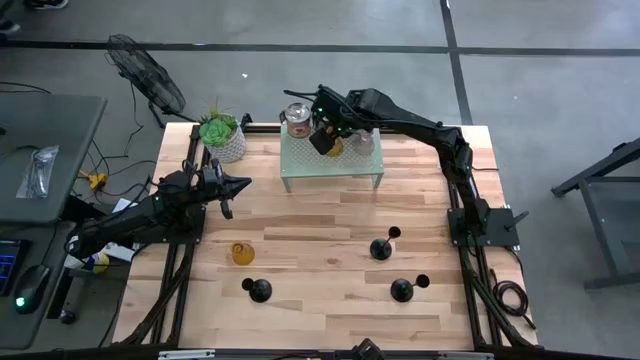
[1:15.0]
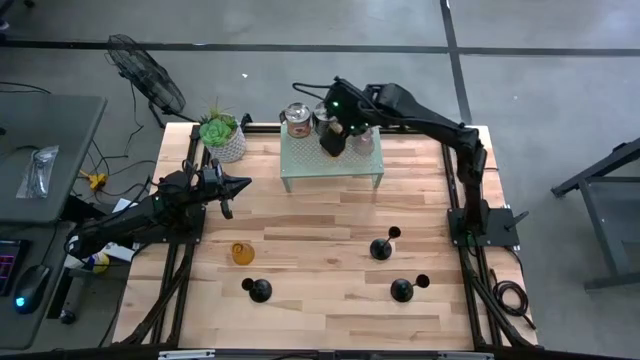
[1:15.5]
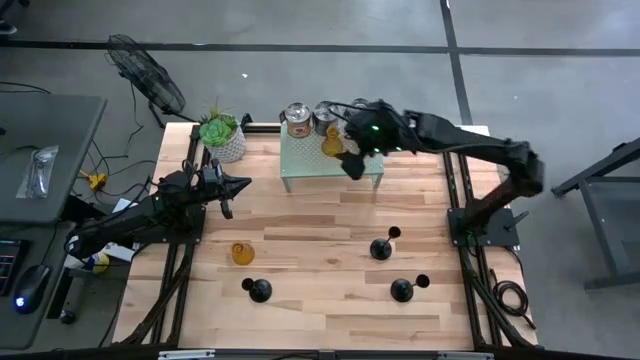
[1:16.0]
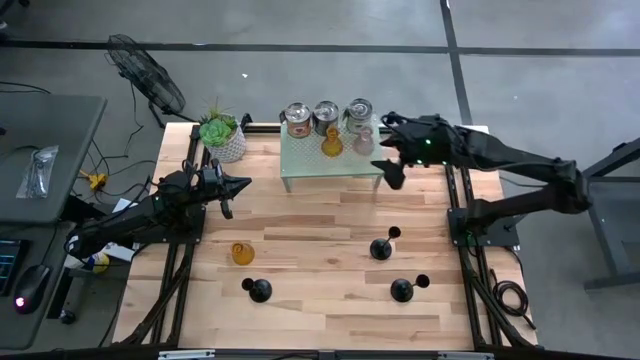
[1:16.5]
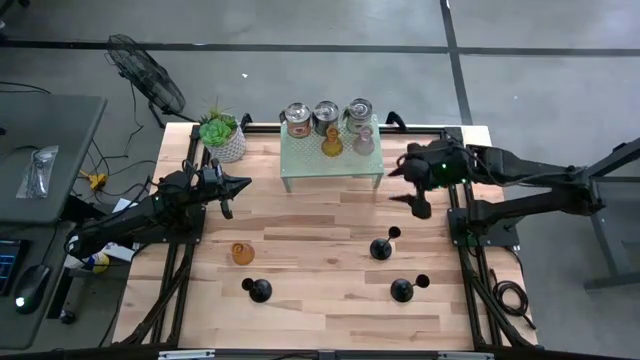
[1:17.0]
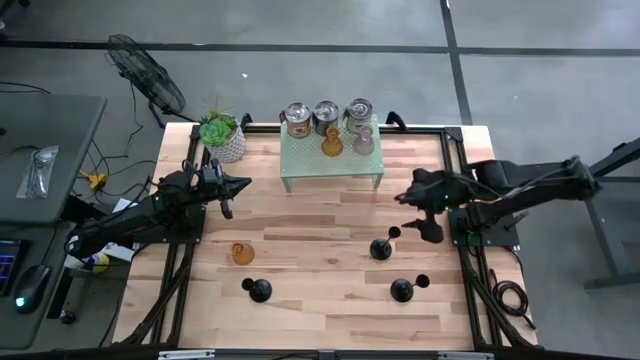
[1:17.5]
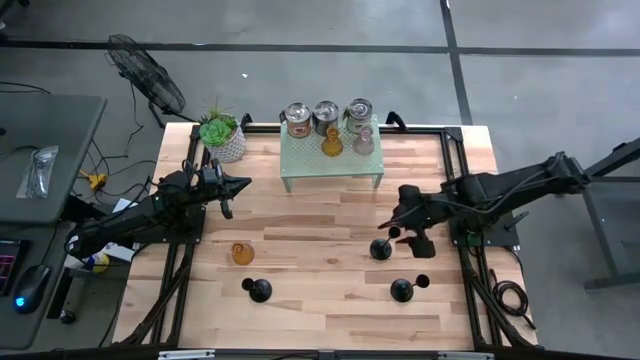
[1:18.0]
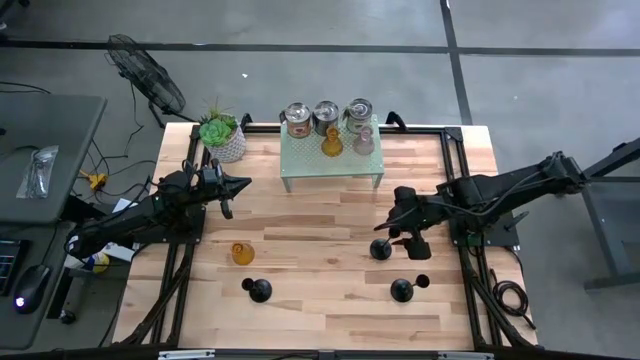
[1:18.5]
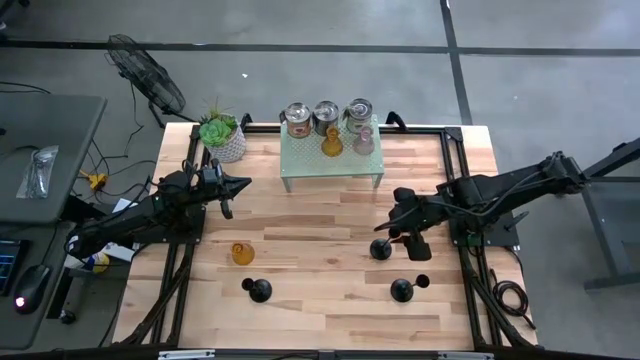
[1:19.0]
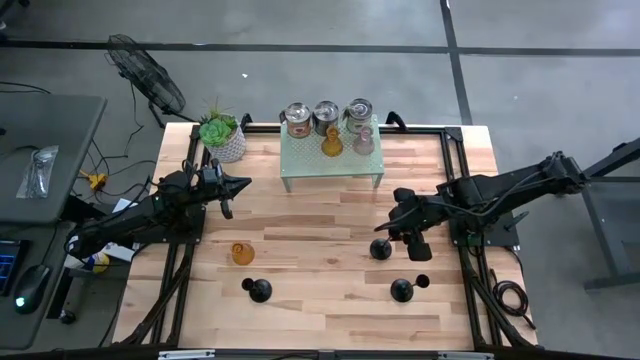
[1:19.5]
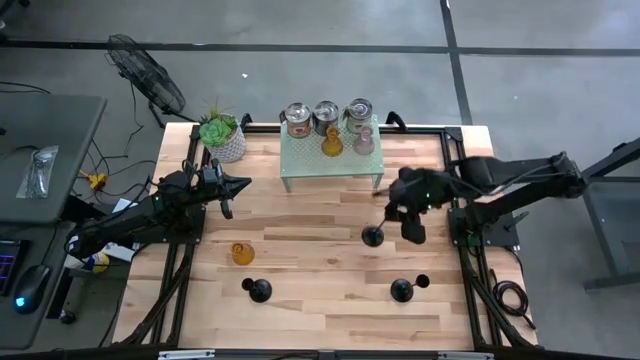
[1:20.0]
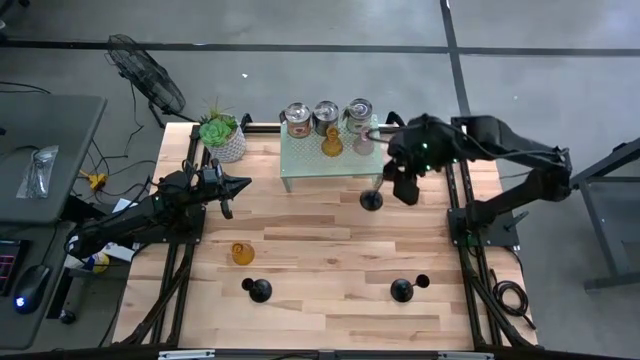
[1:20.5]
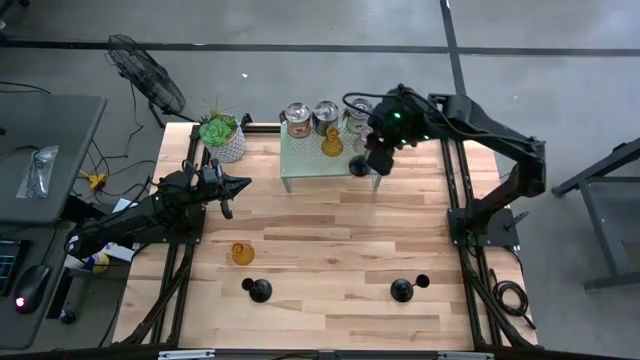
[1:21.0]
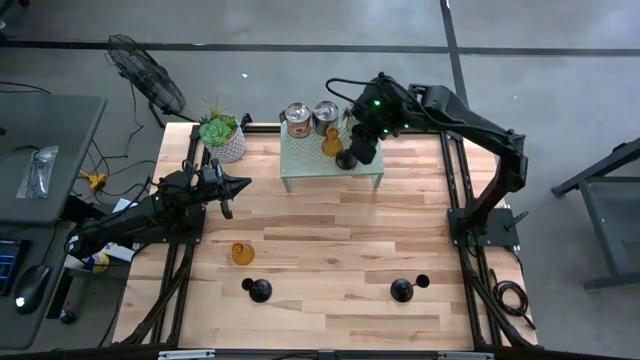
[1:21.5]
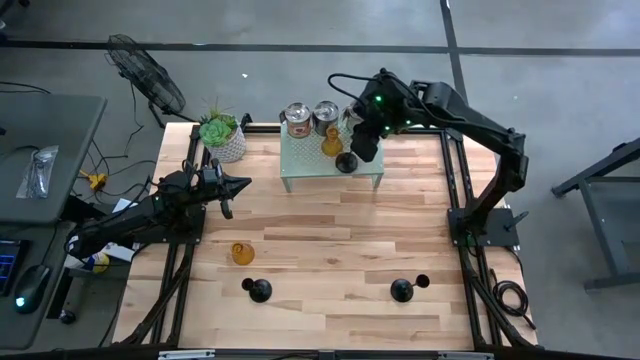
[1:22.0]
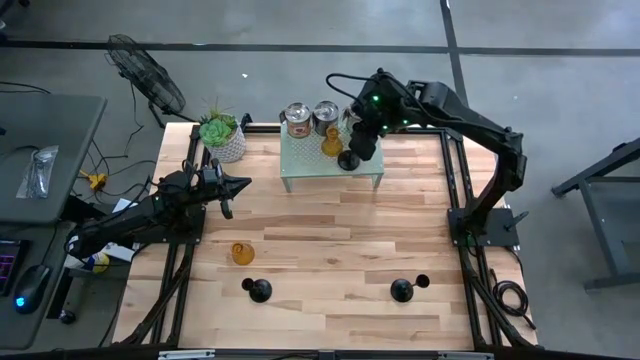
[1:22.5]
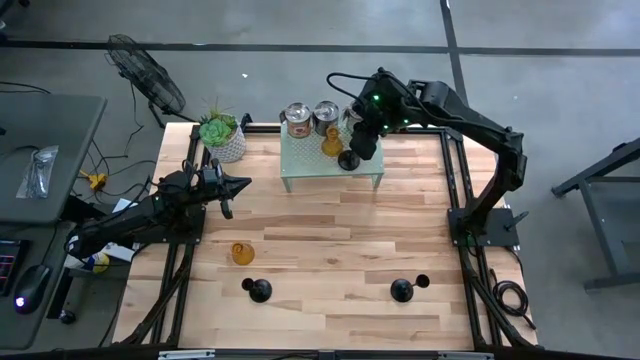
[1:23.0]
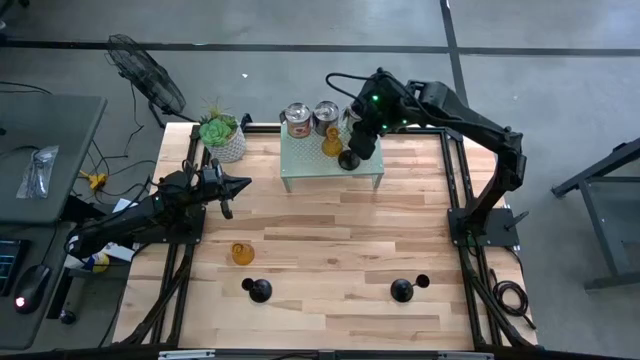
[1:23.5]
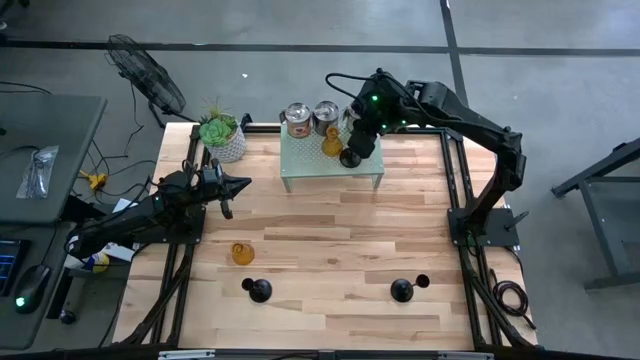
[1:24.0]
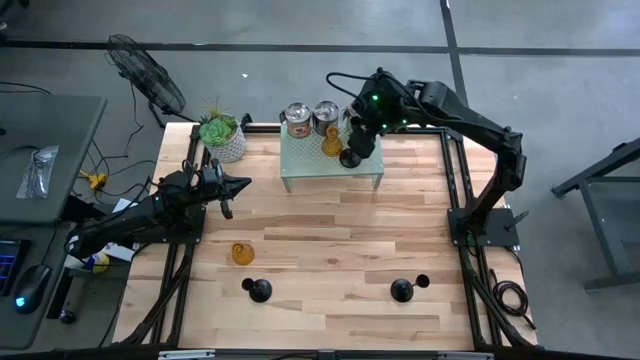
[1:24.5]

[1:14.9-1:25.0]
Task: Pick & Place candle stick holders
Put the top black candle holder on the shelf

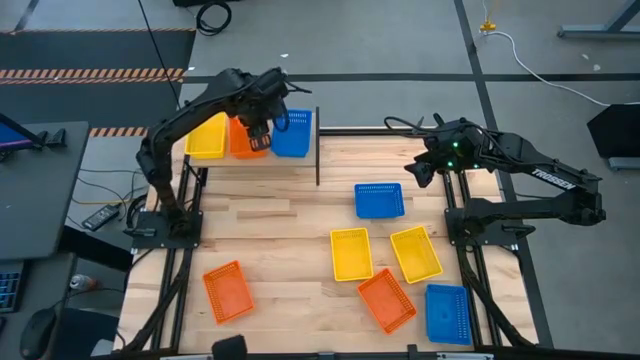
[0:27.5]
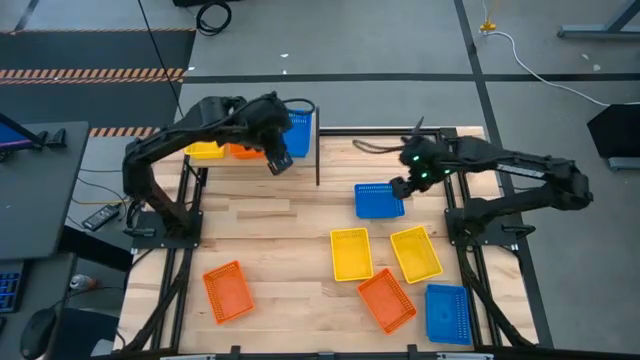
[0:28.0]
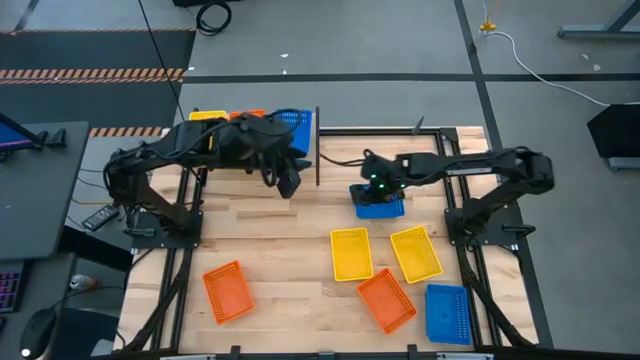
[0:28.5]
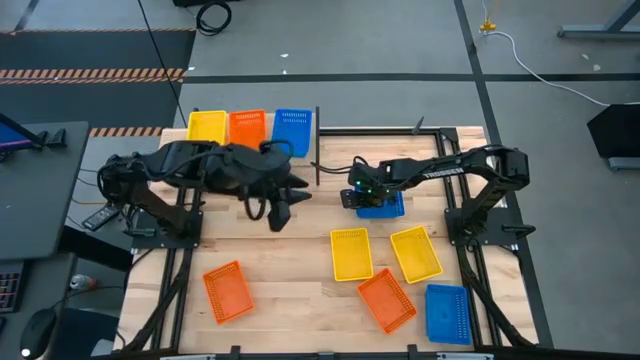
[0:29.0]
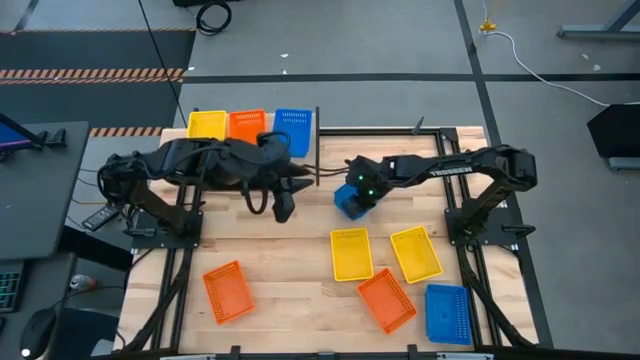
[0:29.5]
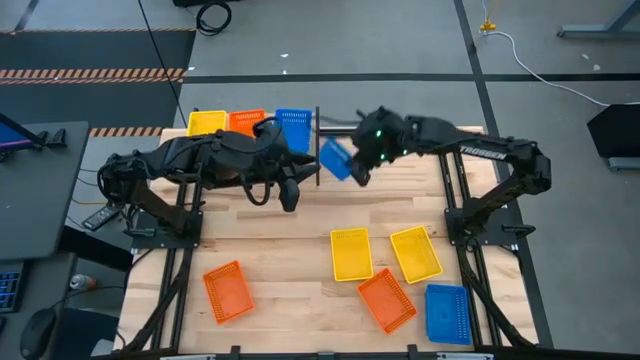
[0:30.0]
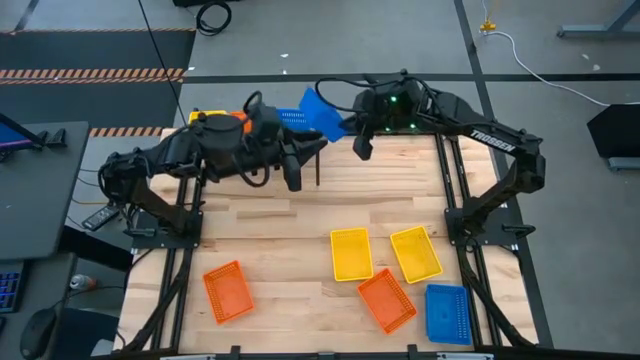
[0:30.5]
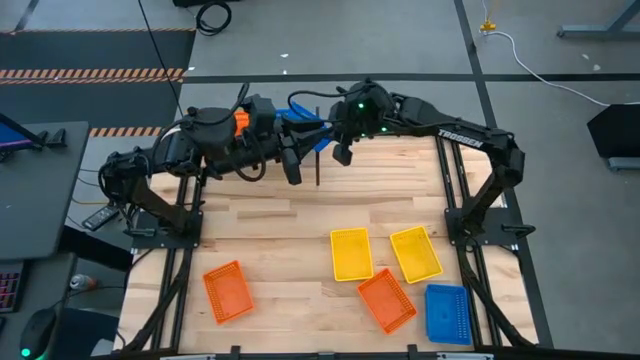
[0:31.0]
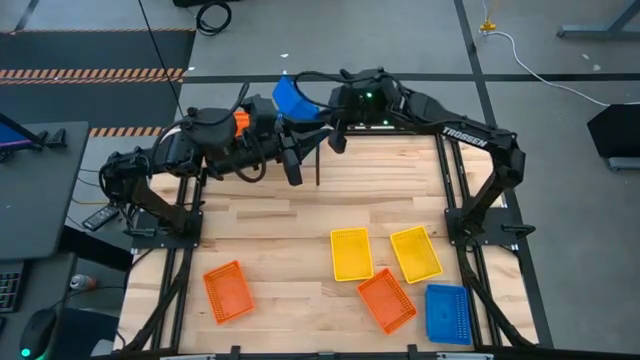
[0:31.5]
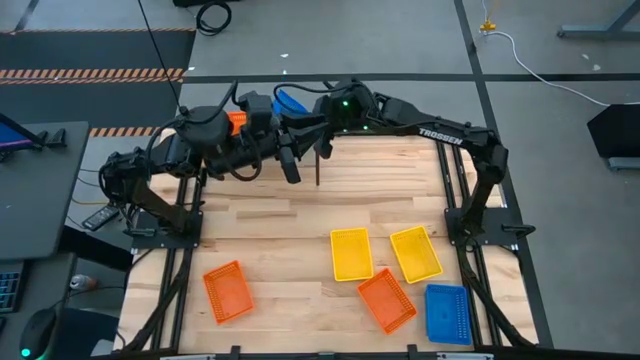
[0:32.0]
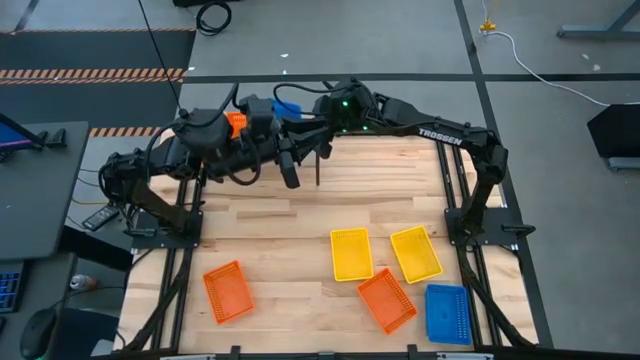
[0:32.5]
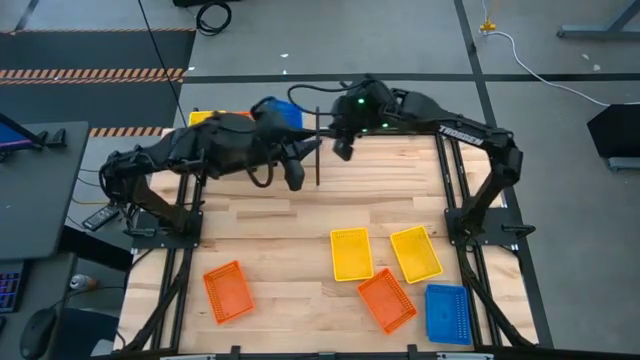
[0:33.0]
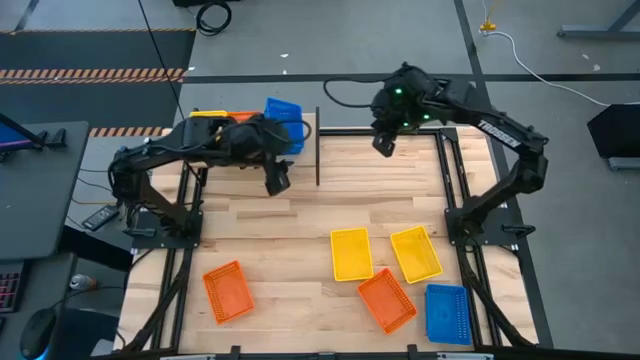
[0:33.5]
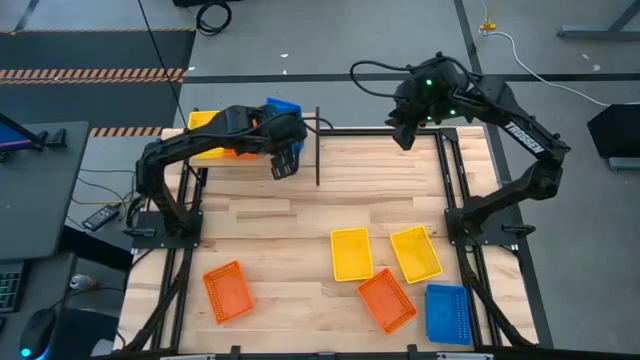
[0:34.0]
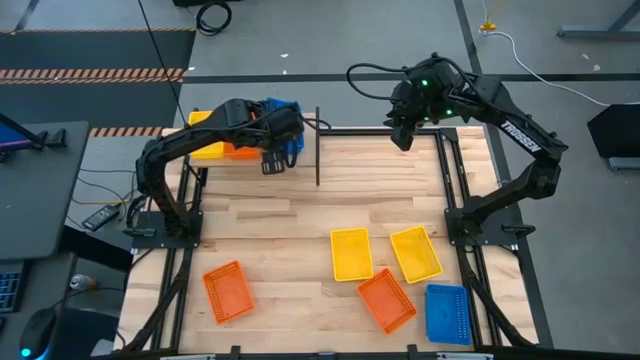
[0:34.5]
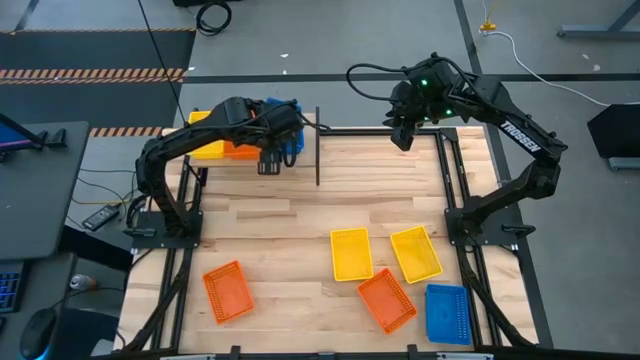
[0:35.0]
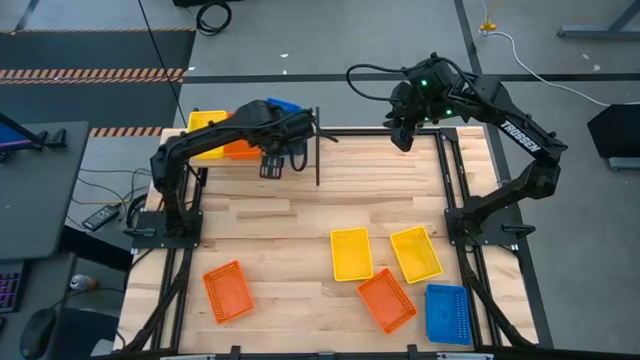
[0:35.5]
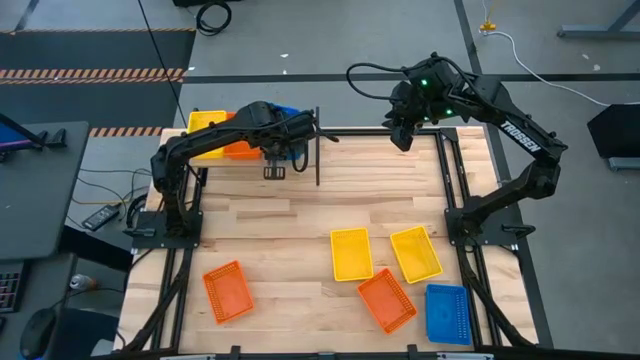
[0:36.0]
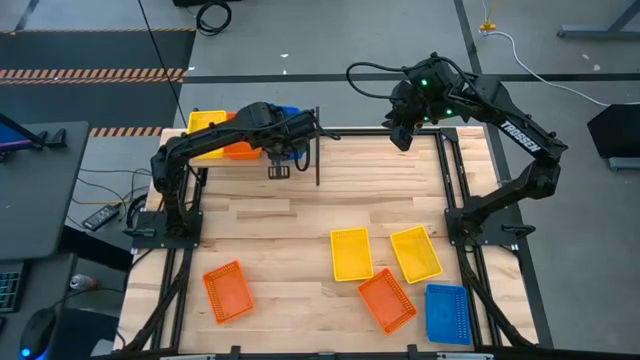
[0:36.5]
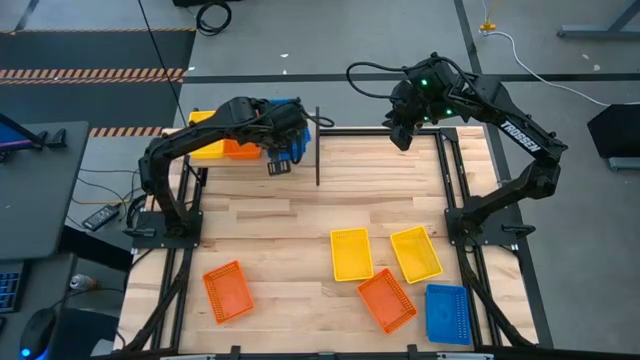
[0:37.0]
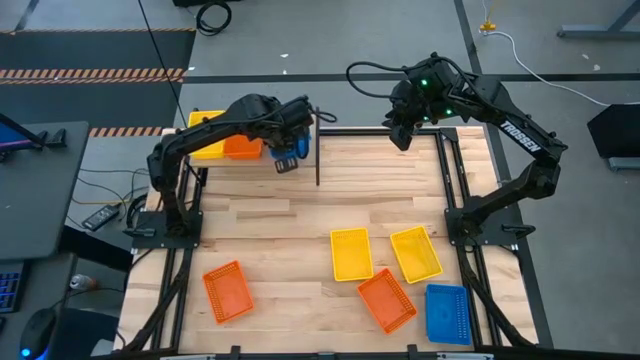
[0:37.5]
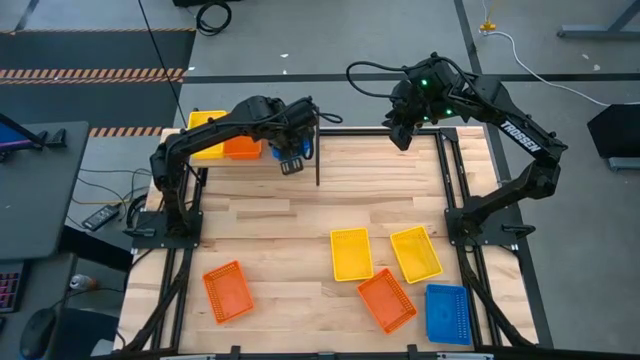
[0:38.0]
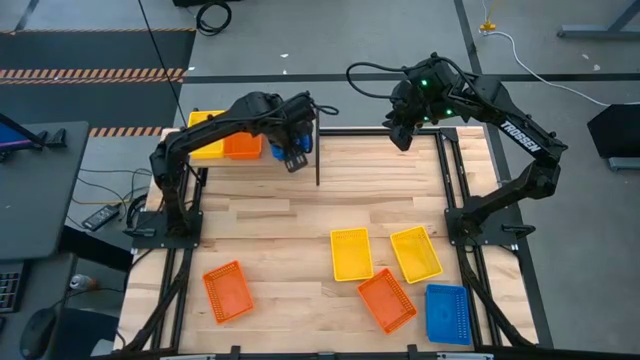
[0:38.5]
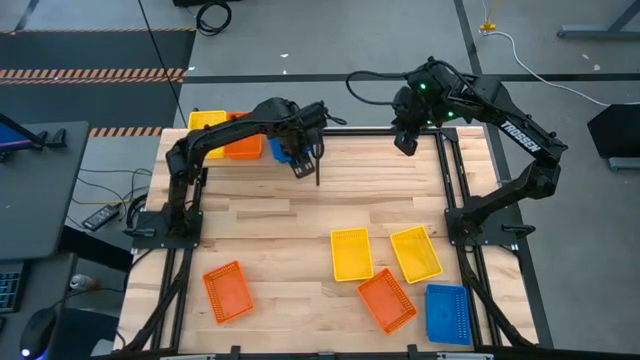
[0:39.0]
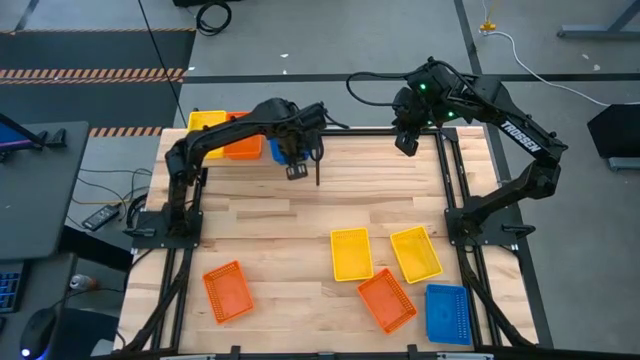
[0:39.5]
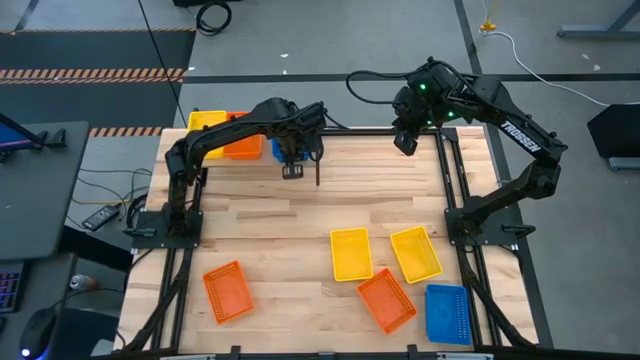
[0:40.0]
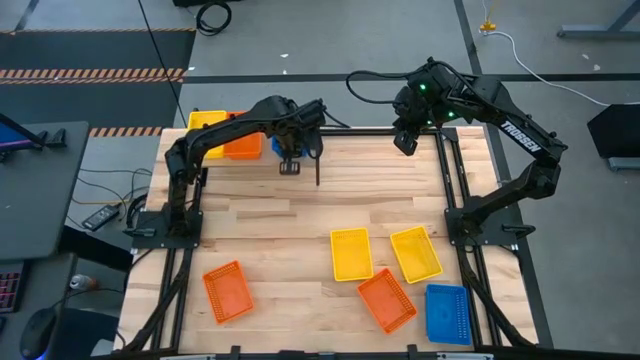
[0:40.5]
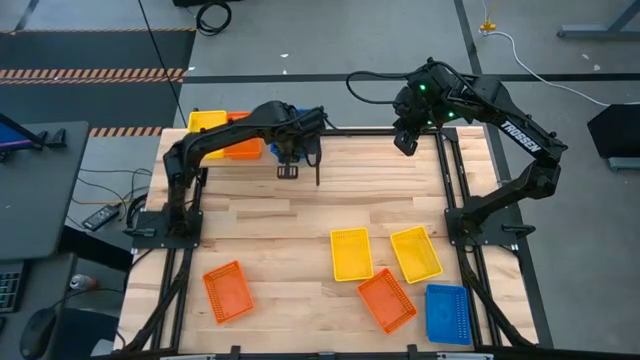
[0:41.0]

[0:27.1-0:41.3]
Task: Stack baskets on shelf by color
Stack the top blue bin on top of the blue bin on the shelf
